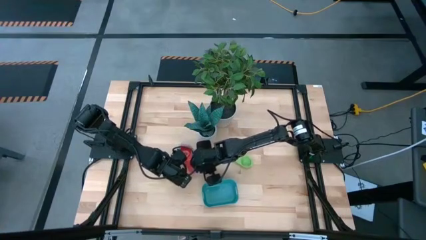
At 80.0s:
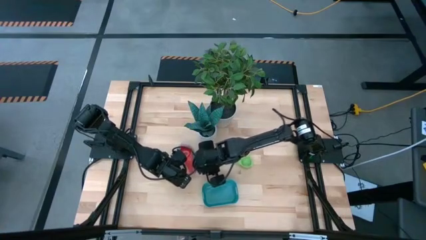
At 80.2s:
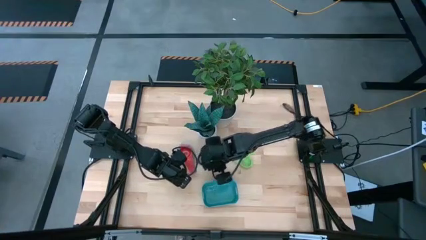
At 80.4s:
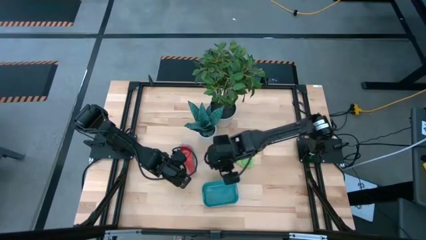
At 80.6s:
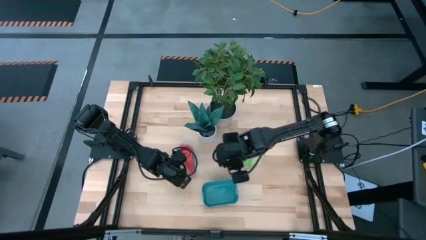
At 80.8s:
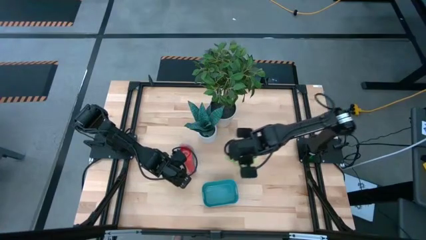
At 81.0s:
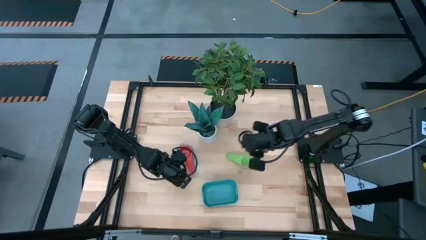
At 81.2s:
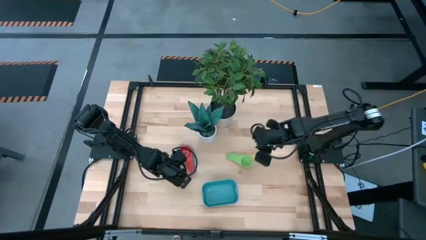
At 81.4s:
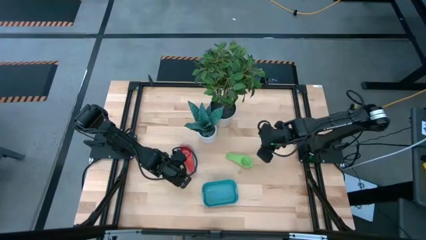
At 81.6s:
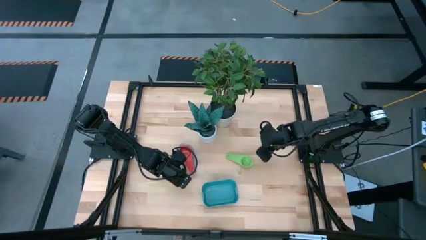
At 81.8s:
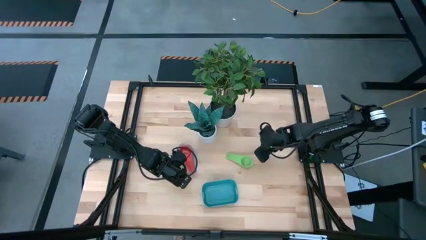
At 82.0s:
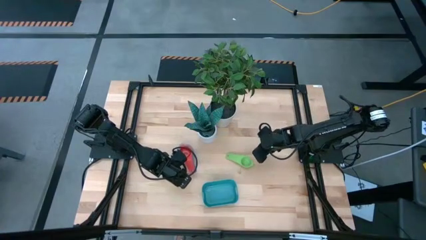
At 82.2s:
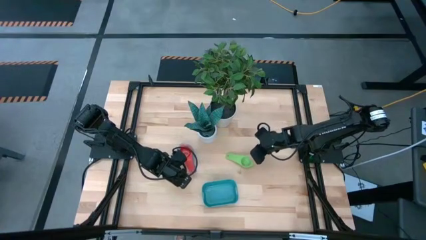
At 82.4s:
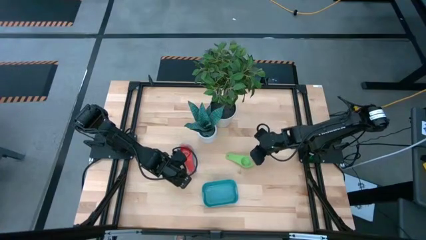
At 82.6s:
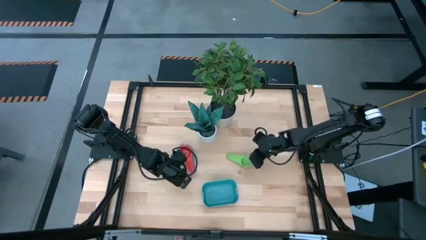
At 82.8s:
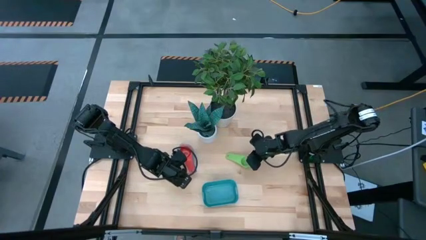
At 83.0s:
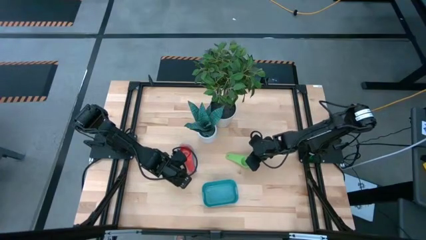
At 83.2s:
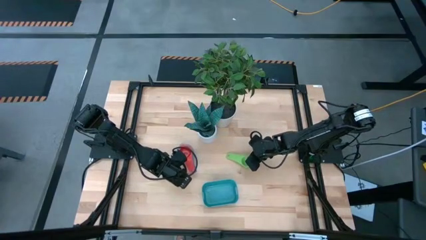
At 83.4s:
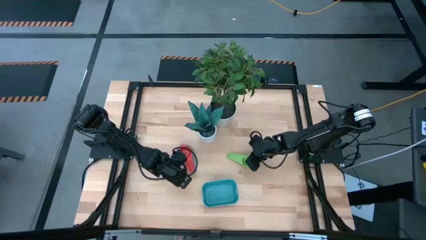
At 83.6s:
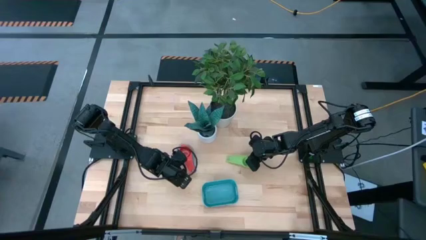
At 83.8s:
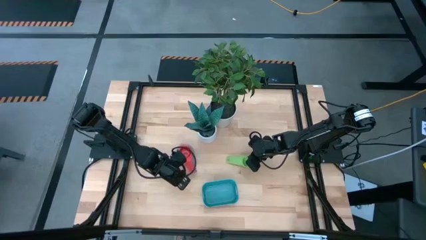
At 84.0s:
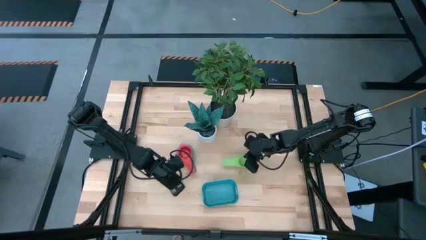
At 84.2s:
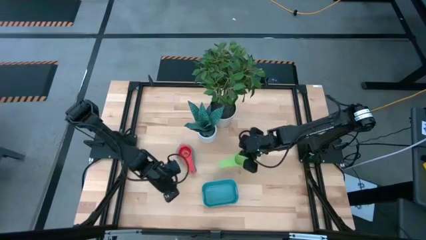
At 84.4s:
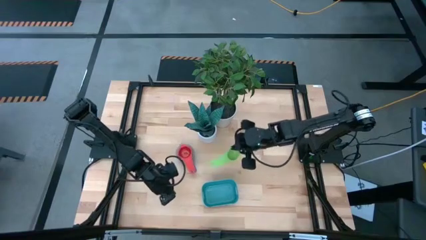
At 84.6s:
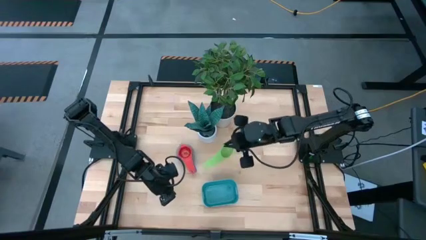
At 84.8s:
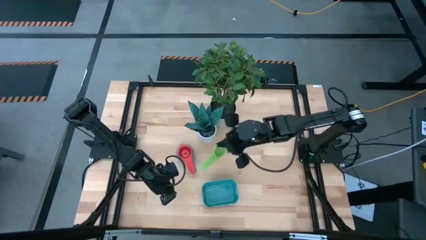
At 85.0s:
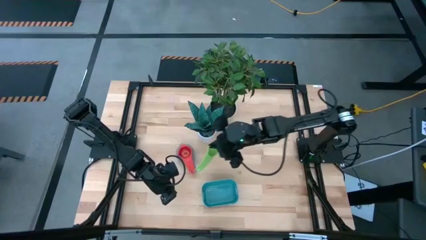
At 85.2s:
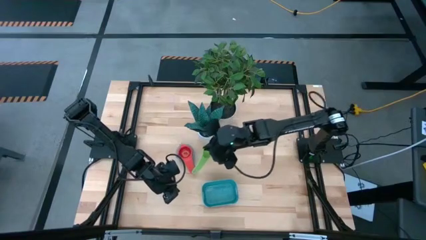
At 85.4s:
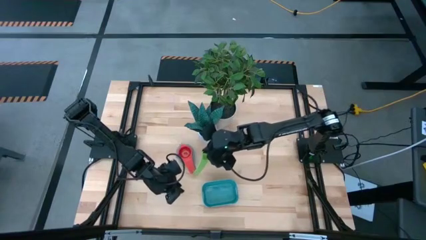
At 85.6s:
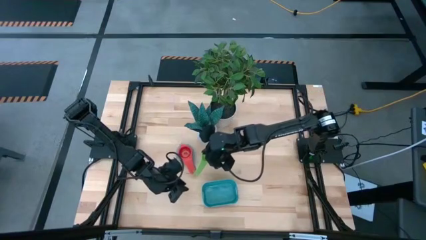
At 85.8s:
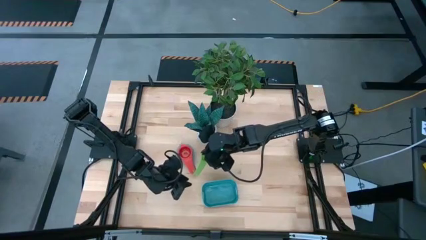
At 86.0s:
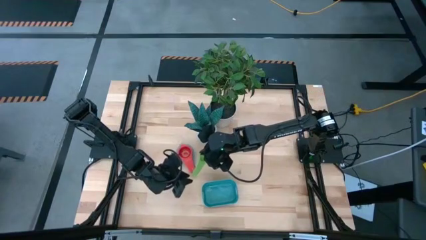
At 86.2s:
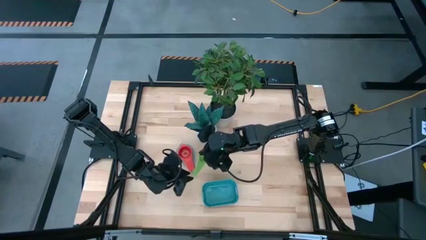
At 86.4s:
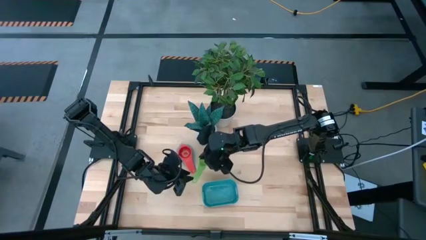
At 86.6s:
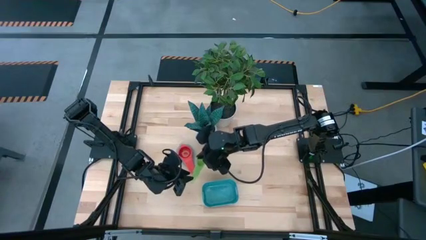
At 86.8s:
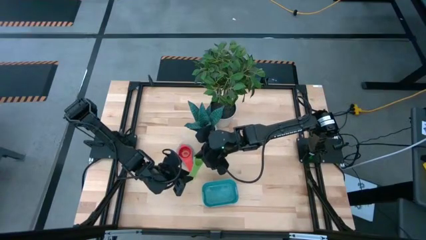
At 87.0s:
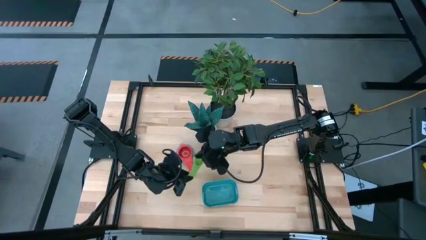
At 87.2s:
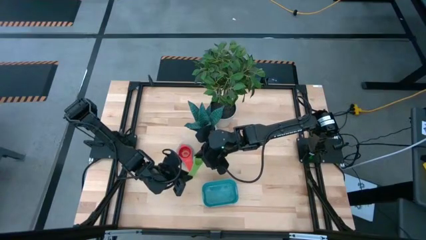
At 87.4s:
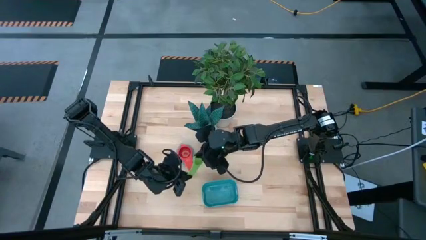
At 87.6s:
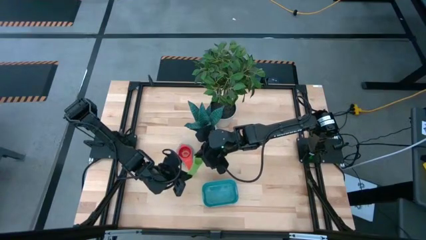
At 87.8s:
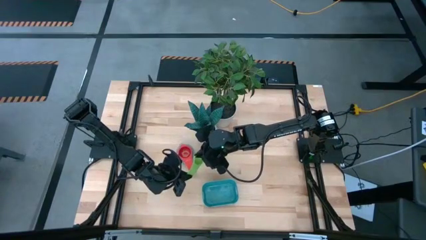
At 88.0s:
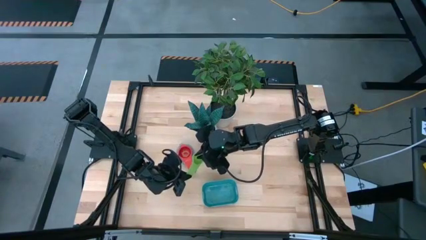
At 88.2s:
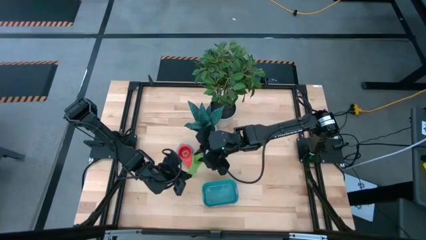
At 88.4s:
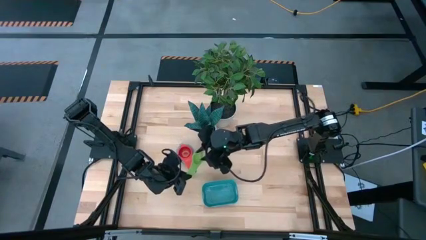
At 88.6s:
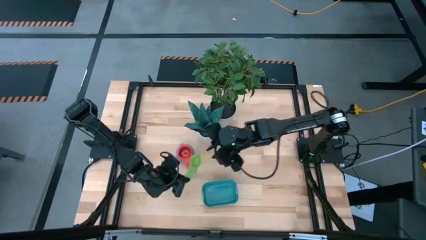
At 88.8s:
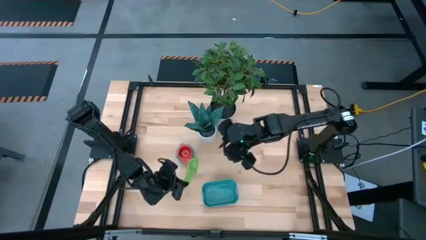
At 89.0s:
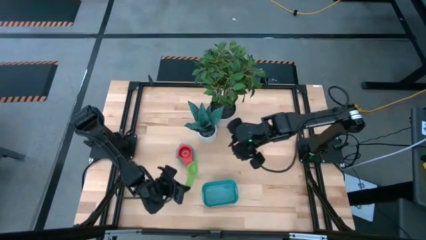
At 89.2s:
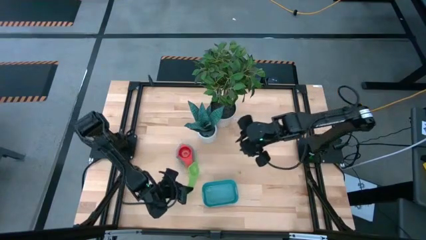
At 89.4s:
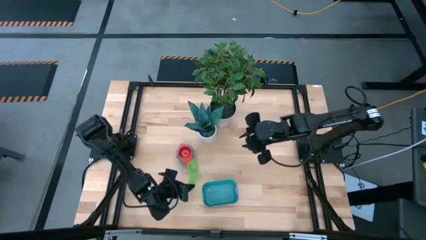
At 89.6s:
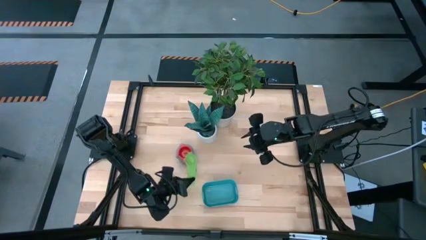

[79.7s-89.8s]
Task: Nest measuring cups in basket
Stack the green measuring cup on top of the red measuring cup
